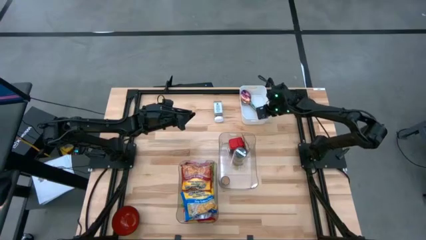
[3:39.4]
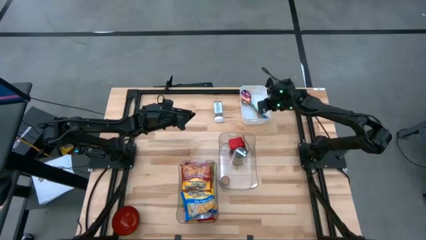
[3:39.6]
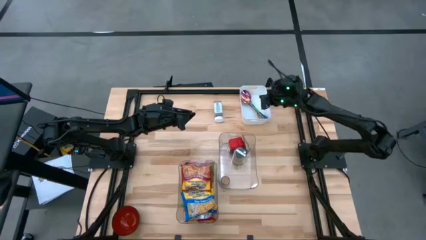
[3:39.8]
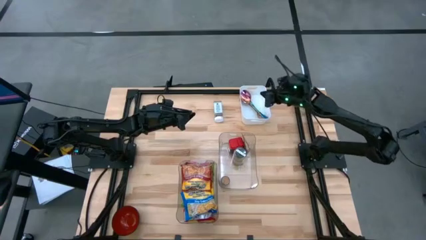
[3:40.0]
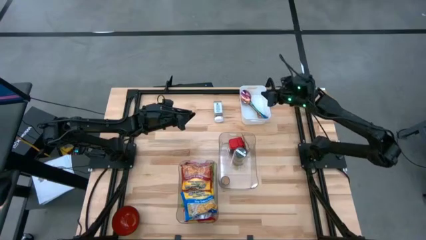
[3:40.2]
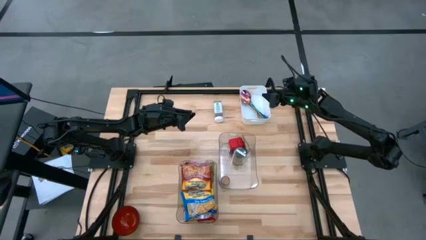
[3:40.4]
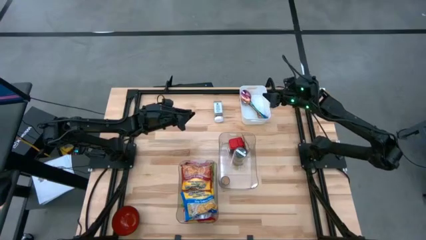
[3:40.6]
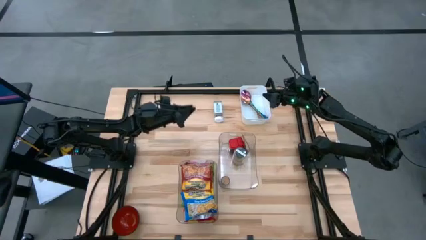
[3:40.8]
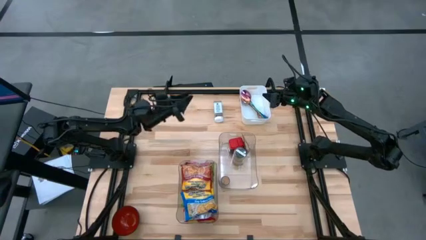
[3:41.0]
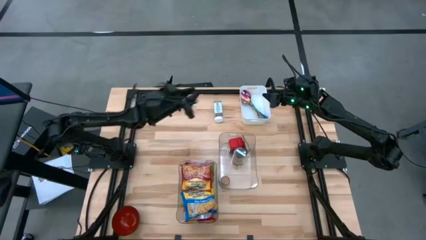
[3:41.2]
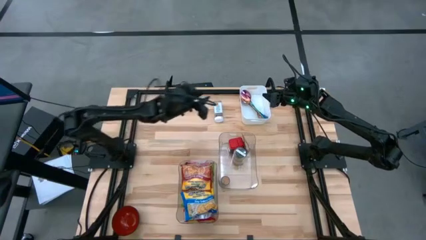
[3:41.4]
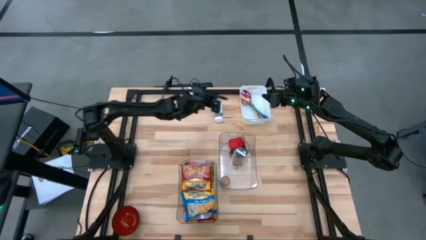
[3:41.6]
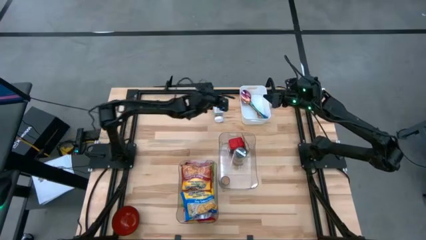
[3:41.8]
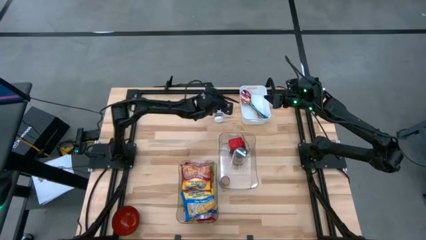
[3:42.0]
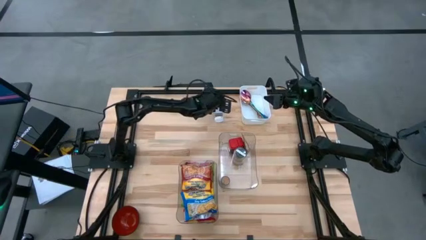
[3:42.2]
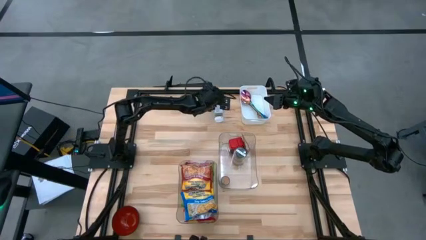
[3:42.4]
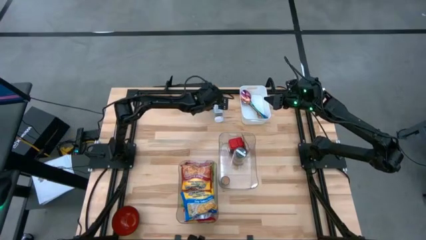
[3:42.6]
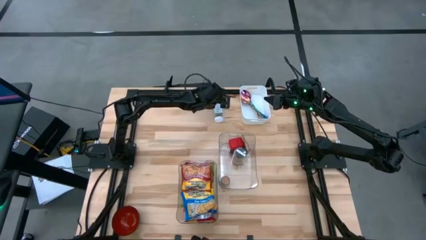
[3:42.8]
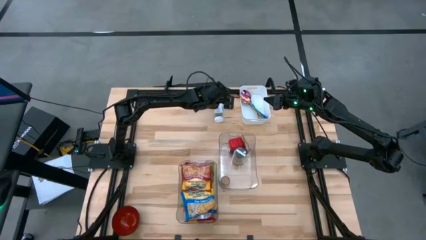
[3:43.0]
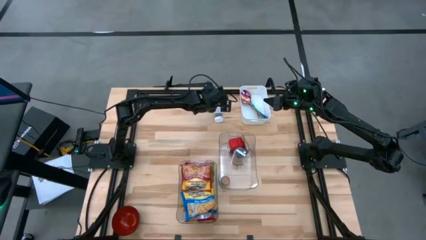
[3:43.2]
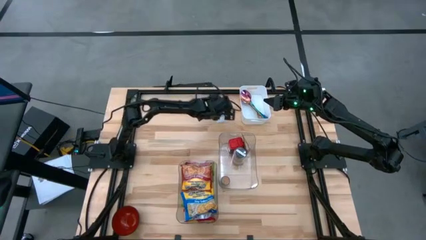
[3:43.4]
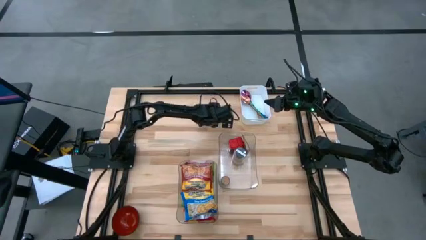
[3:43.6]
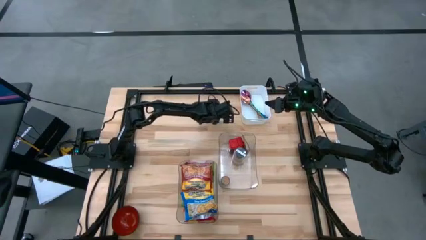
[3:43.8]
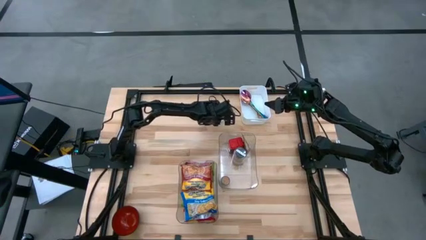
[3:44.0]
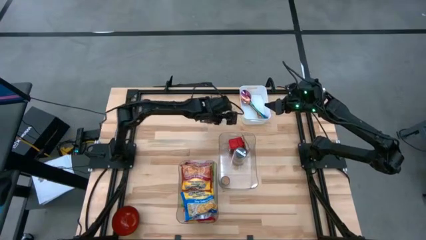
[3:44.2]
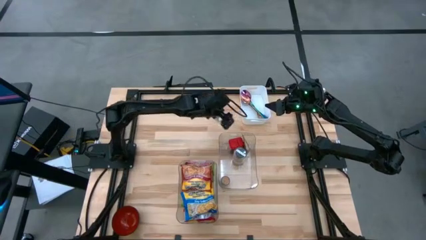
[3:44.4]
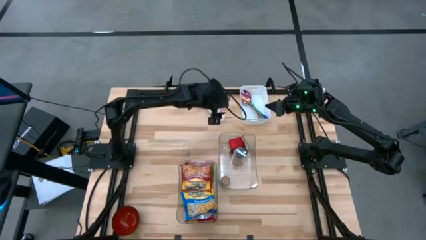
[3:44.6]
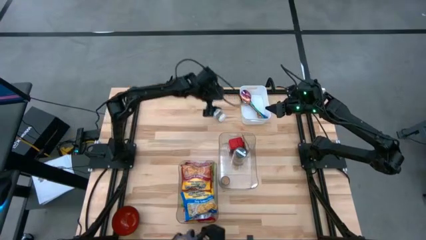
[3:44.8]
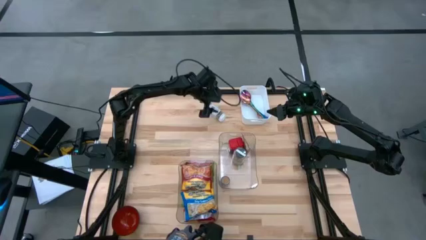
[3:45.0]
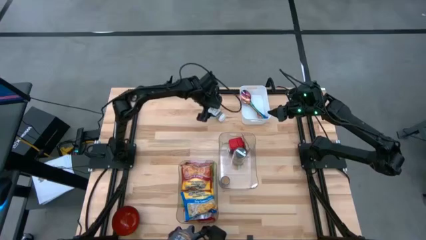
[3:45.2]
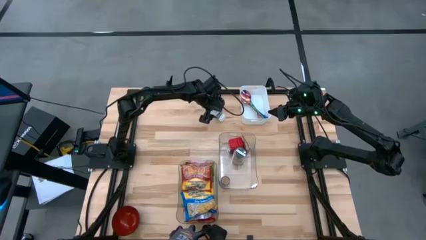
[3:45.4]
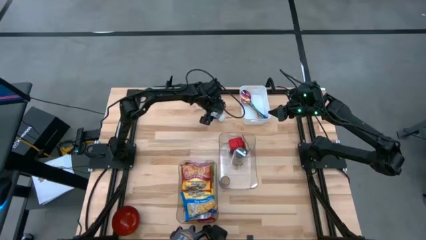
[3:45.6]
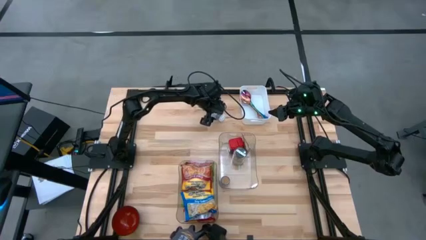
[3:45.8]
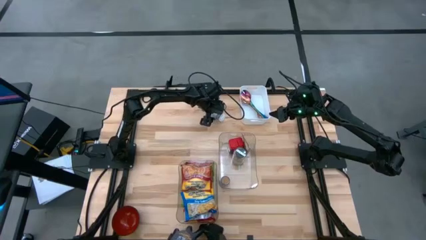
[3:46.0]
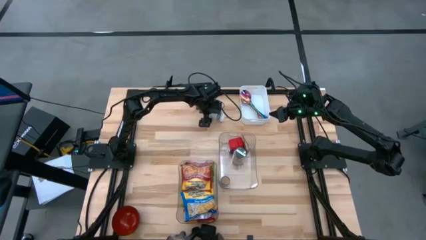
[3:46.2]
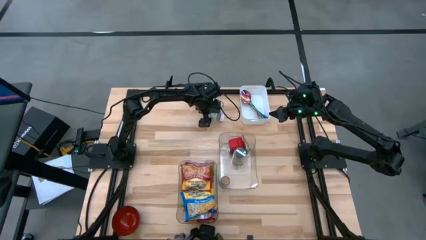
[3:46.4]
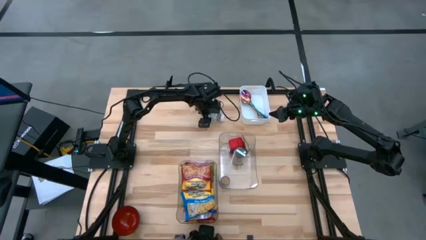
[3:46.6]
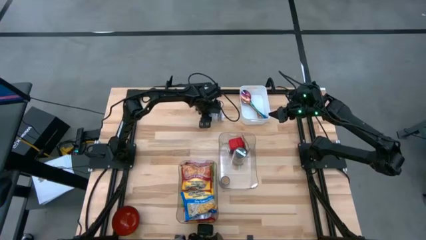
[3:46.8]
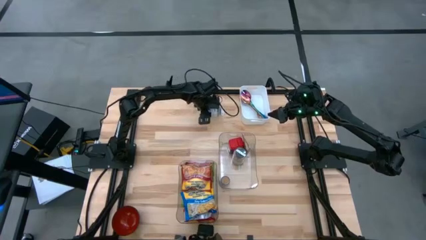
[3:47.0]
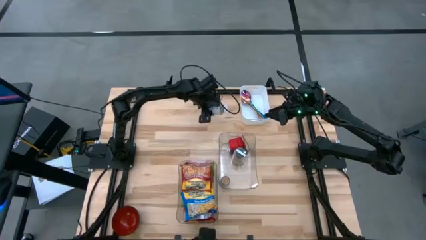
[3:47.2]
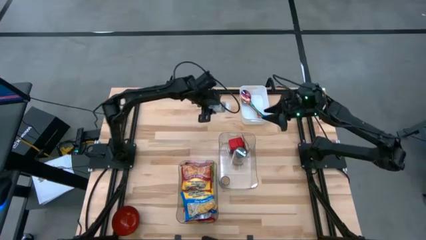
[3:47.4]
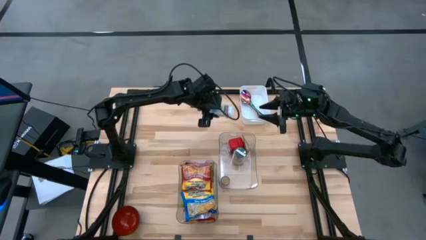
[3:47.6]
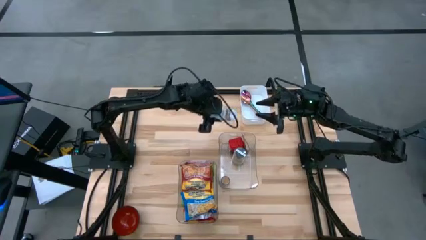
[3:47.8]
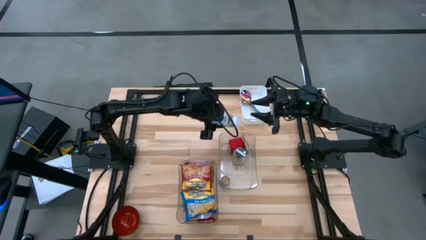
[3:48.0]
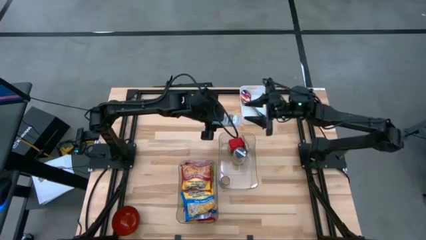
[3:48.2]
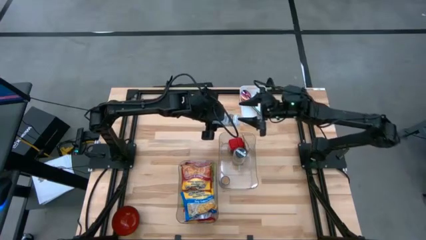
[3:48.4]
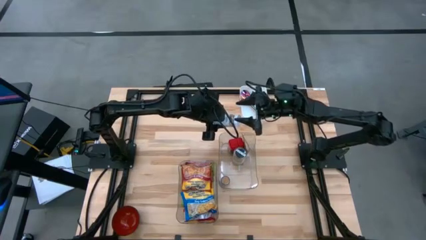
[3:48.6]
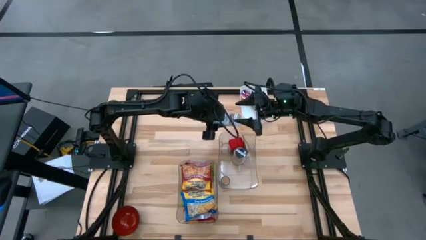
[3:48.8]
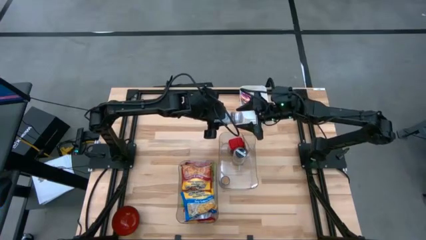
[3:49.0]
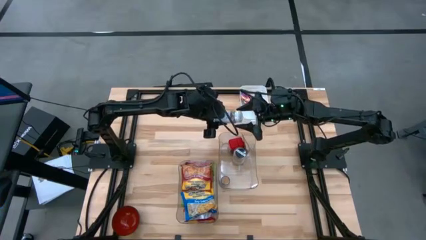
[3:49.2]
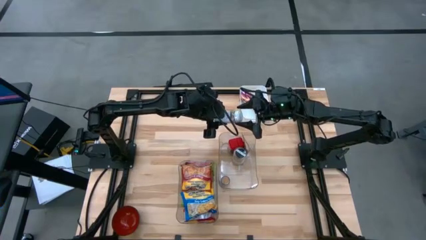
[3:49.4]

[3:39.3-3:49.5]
Task: Pick & Place Food Item
Put the white seasoning bottle into the right transparent bin

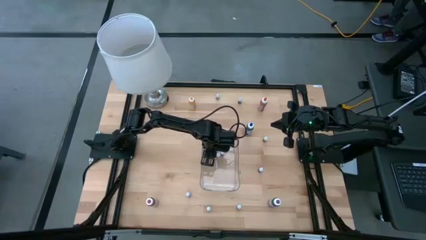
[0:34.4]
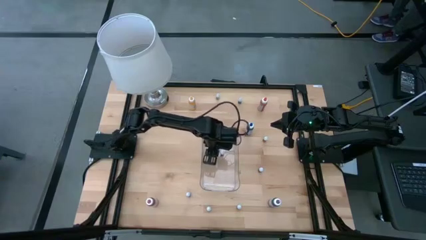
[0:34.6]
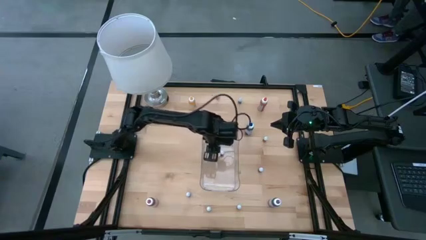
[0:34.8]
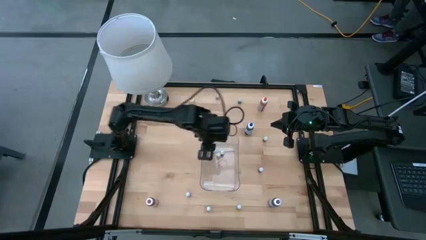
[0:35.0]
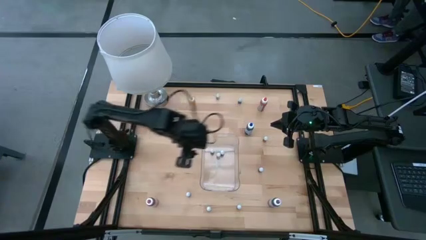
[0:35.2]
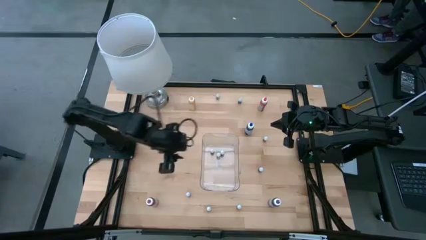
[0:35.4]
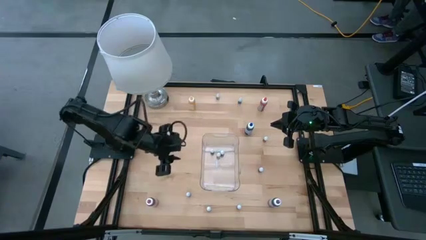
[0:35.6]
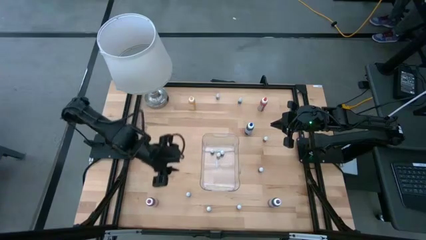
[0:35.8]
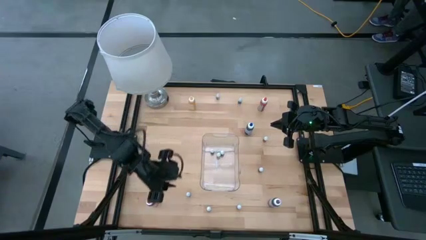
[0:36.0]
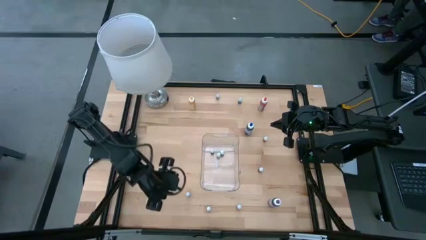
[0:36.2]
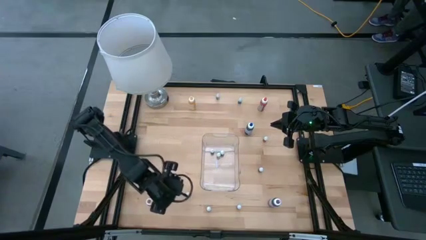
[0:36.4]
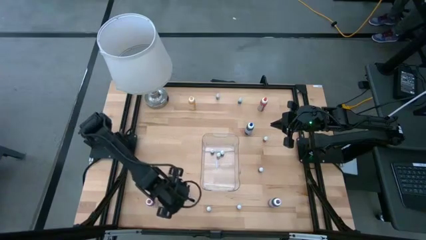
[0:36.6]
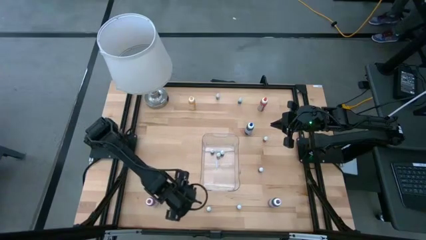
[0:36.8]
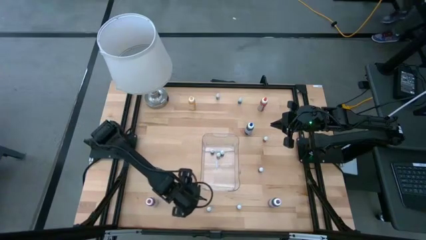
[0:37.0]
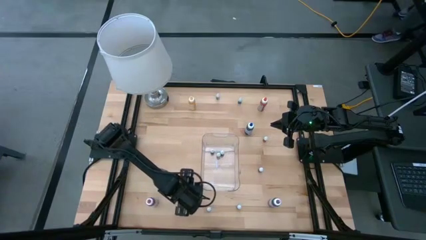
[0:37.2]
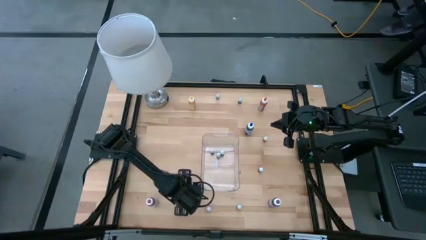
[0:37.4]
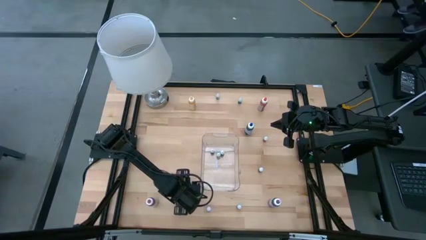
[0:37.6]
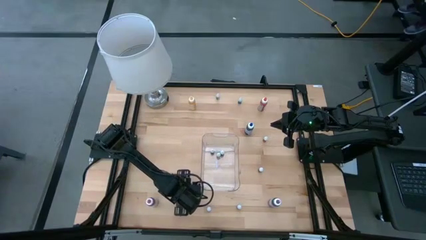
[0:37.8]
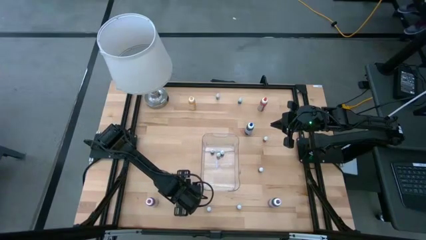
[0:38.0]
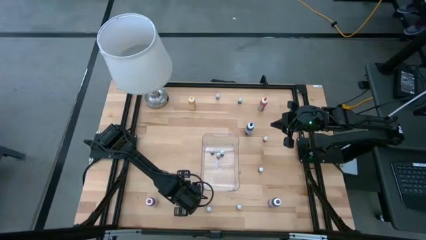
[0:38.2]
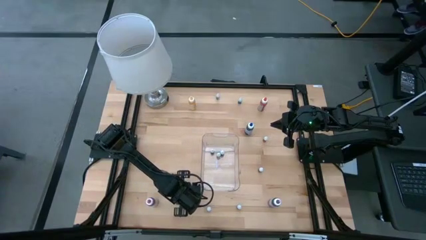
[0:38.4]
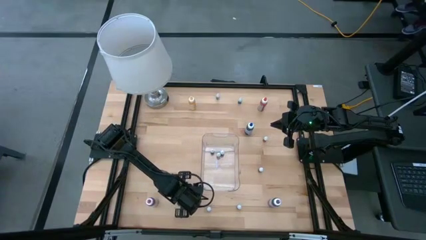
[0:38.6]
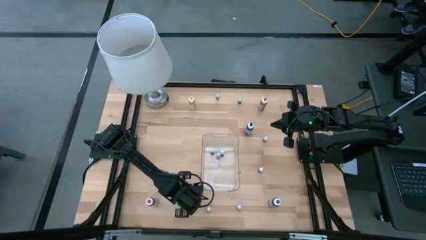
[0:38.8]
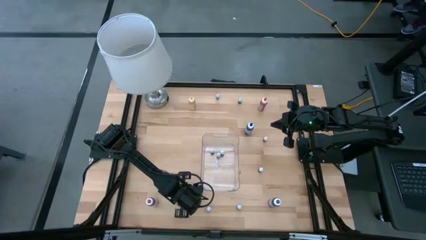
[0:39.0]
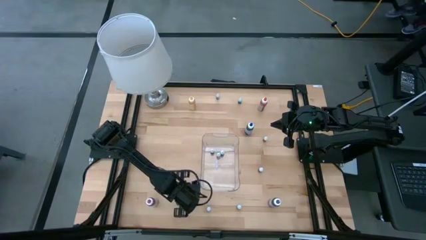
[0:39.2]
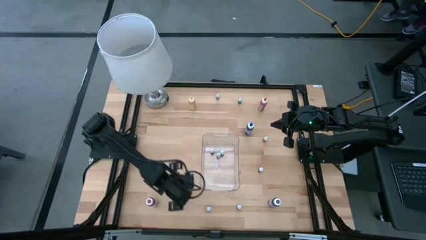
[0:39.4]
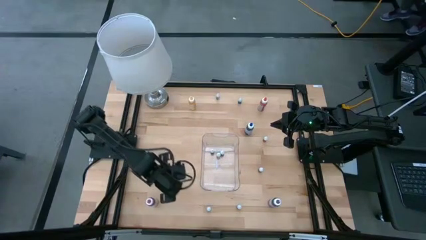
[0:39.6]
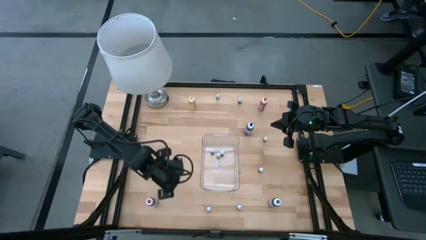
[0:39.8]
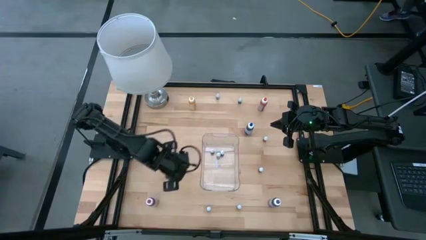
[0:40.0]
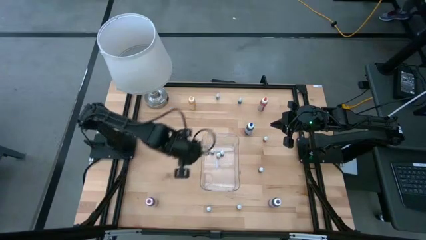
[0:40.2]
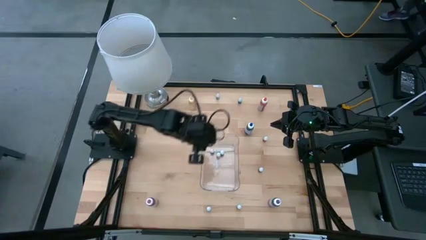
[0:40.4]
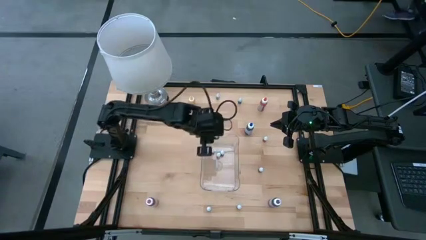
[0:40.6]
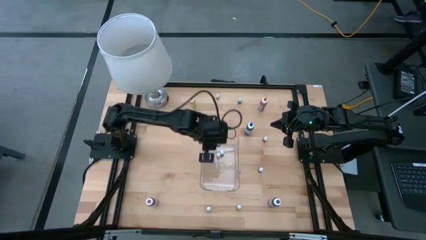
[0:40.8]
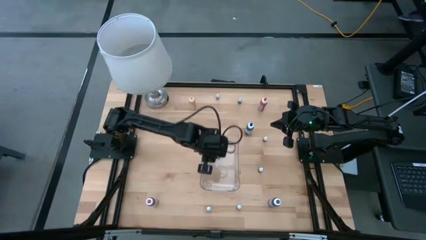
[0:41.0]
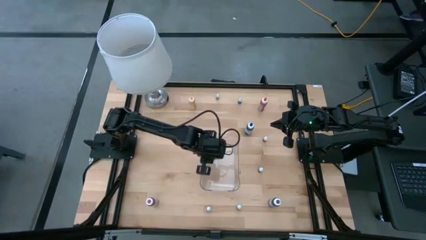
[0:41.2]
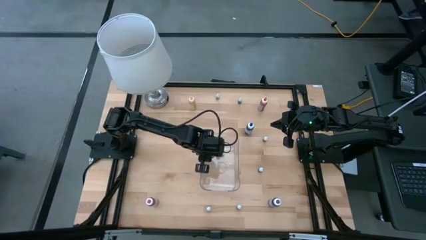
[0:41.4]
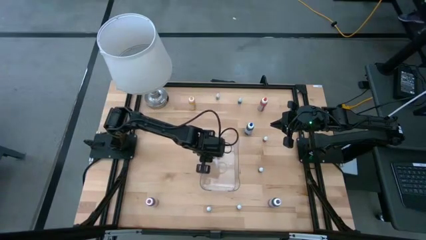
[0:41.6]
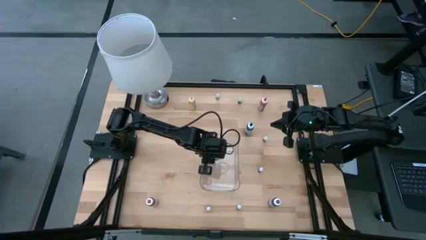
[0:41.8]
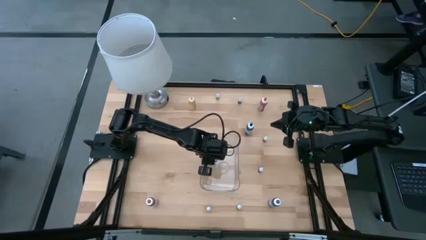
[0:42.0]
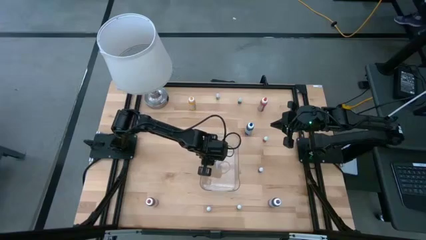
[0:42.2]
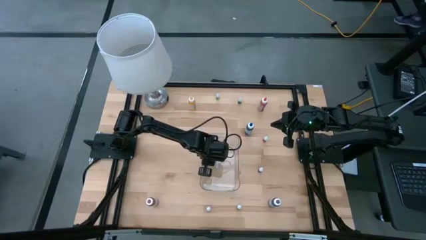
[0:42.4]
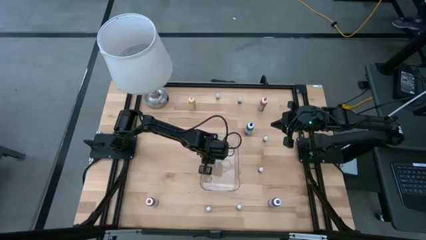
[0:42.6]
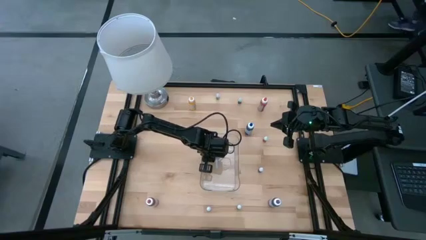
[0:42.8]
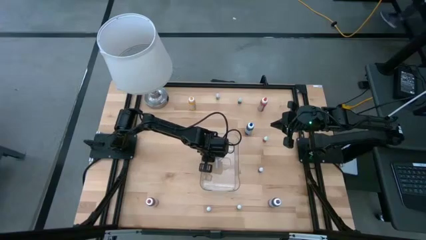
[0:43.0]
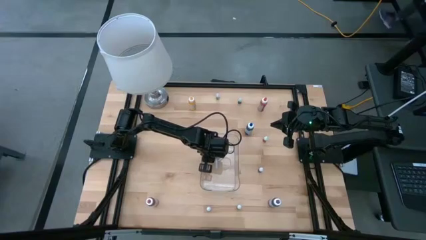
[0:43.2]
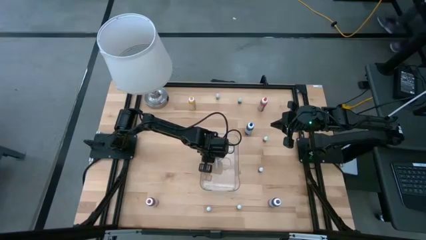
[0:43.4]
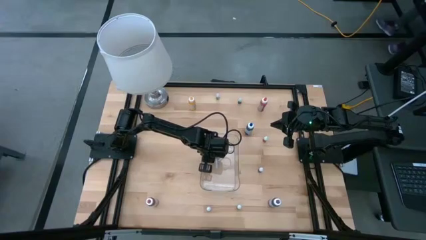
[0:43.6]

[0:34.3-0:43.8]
Task: Pick & Place food coloring
Put the bottom small blue food coloring bottle into the transparent container
